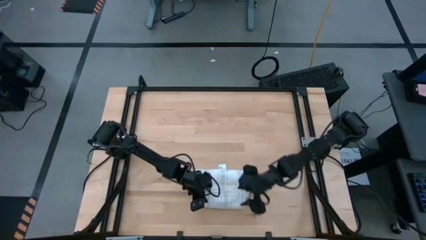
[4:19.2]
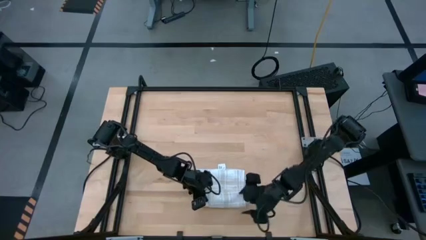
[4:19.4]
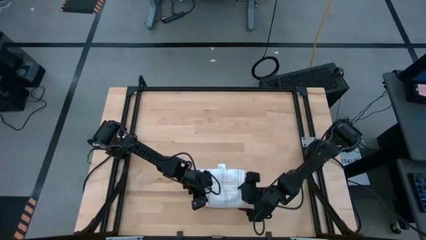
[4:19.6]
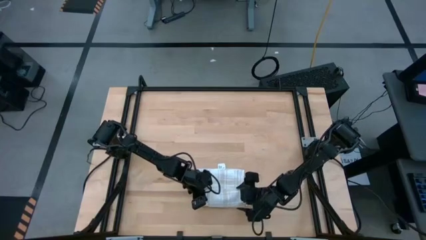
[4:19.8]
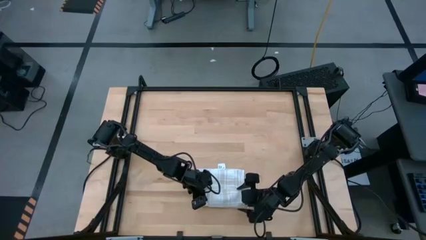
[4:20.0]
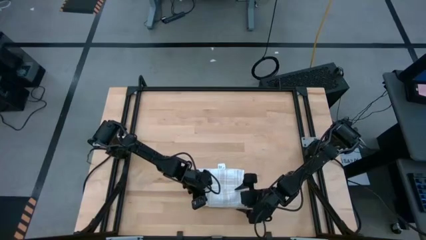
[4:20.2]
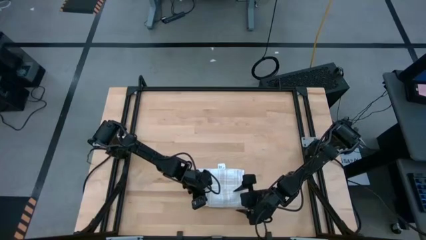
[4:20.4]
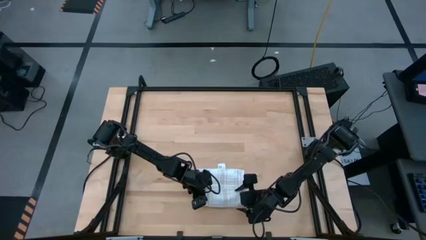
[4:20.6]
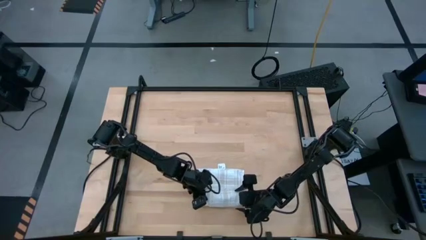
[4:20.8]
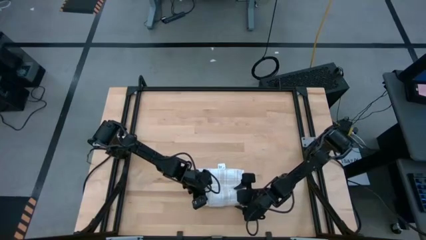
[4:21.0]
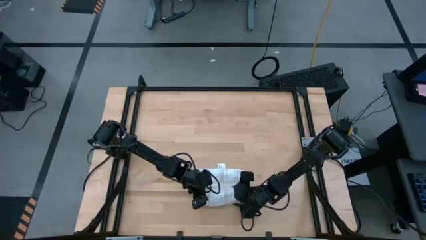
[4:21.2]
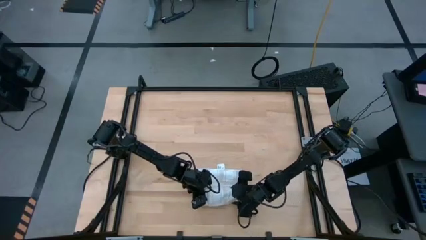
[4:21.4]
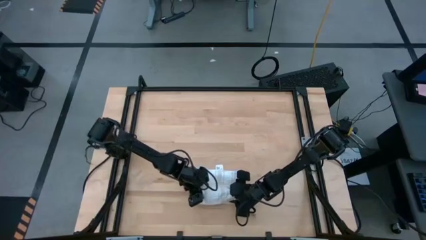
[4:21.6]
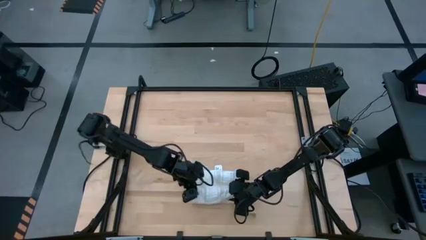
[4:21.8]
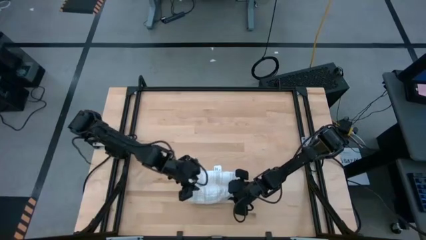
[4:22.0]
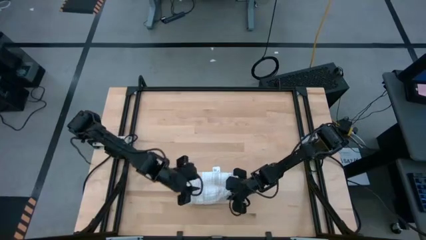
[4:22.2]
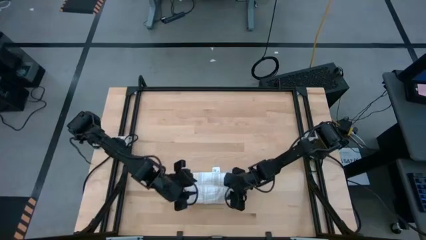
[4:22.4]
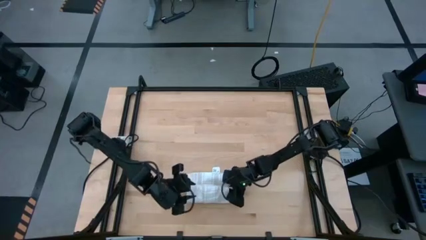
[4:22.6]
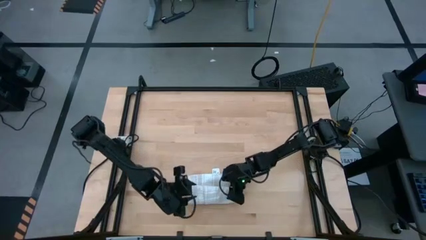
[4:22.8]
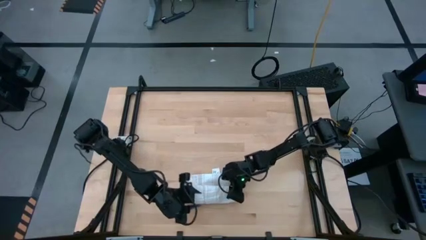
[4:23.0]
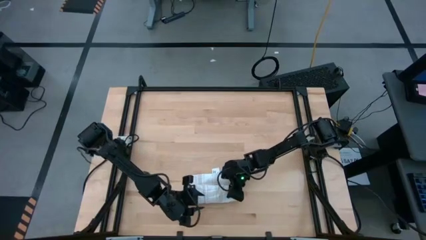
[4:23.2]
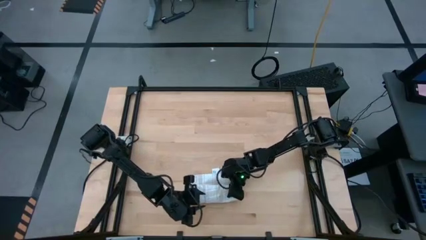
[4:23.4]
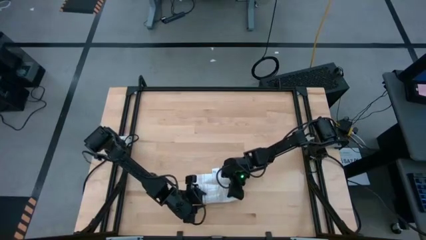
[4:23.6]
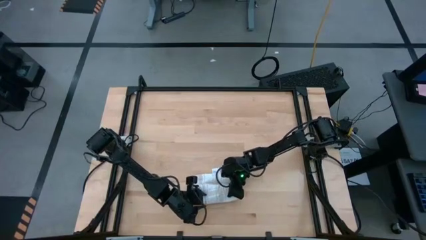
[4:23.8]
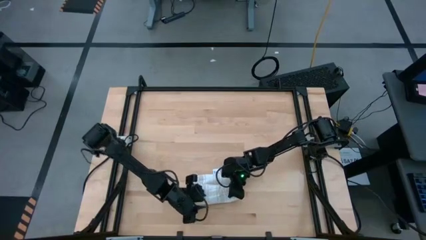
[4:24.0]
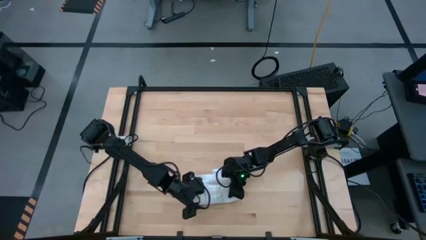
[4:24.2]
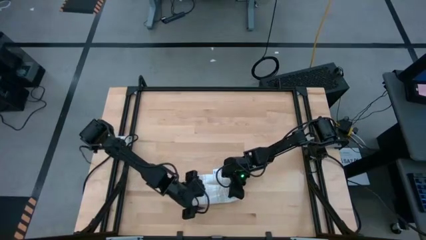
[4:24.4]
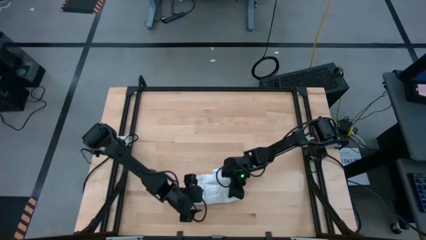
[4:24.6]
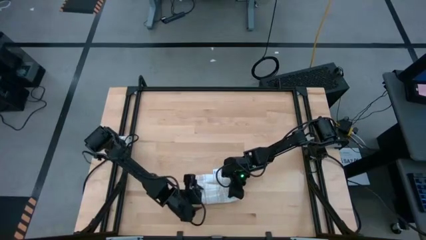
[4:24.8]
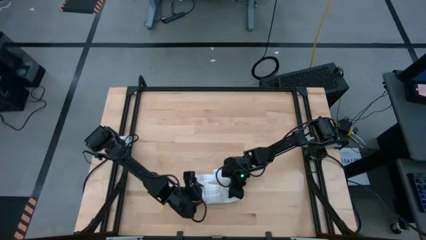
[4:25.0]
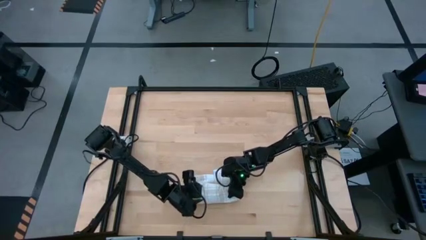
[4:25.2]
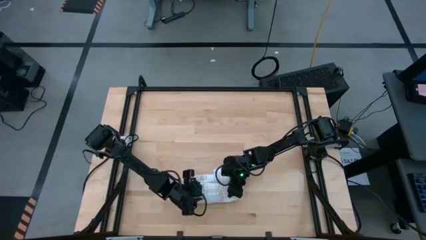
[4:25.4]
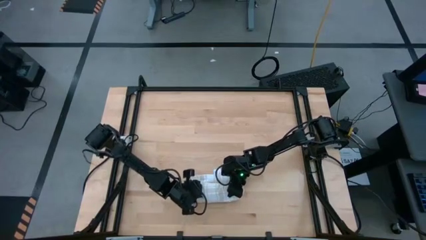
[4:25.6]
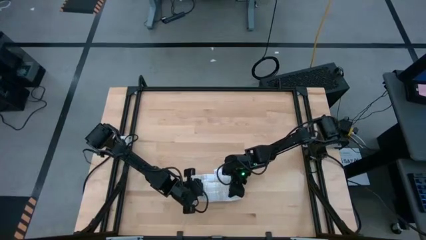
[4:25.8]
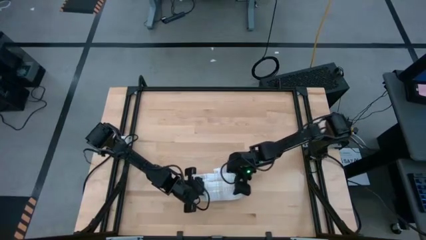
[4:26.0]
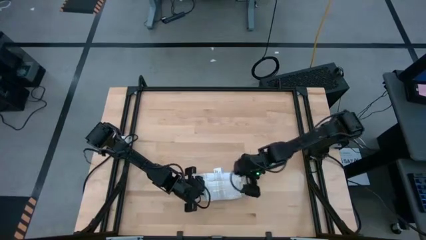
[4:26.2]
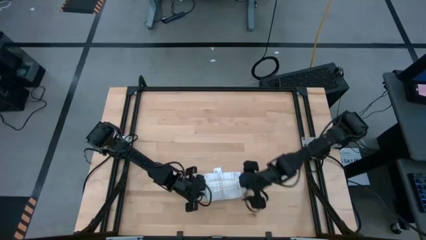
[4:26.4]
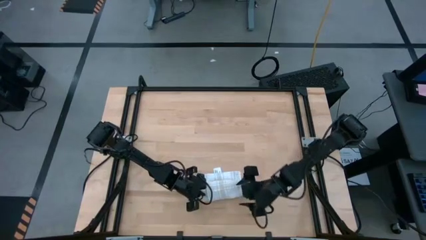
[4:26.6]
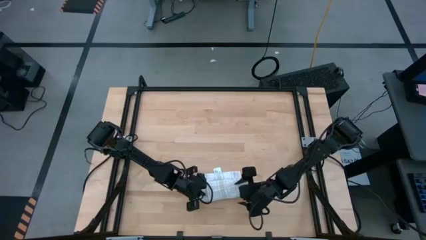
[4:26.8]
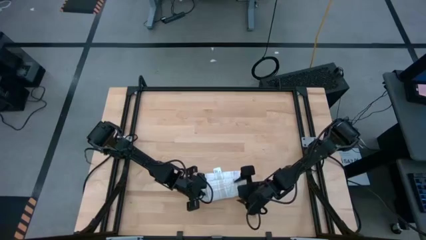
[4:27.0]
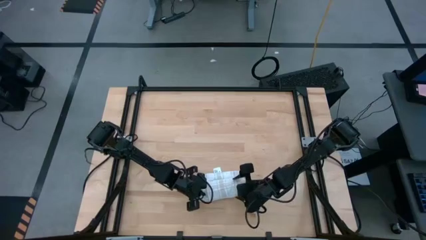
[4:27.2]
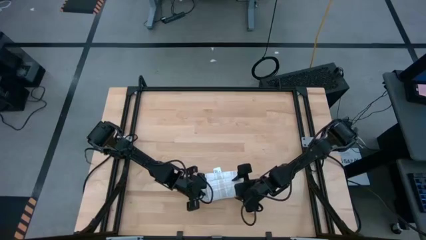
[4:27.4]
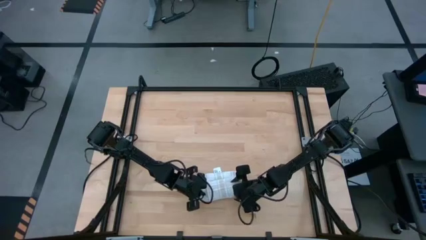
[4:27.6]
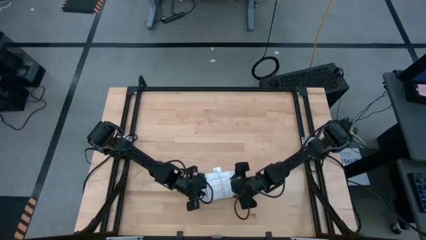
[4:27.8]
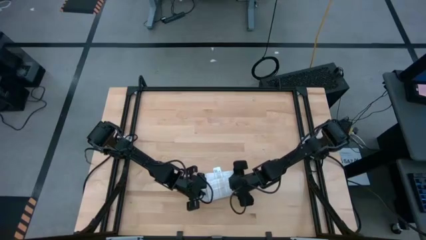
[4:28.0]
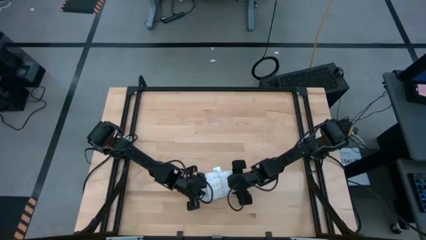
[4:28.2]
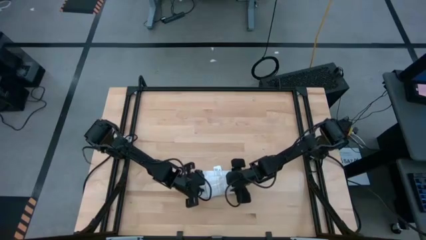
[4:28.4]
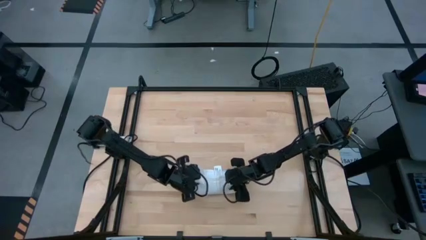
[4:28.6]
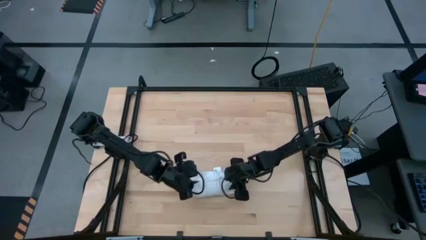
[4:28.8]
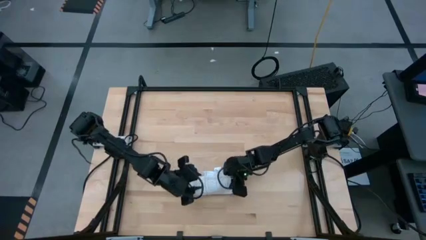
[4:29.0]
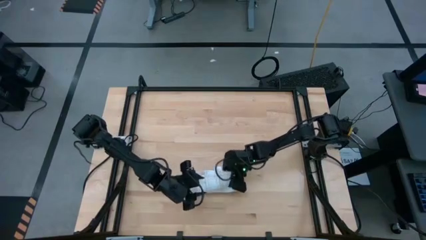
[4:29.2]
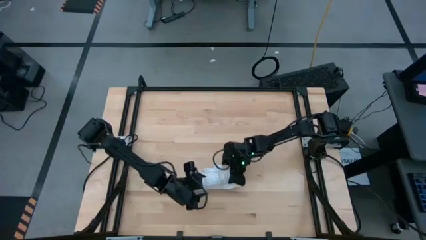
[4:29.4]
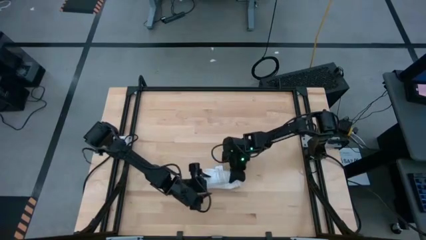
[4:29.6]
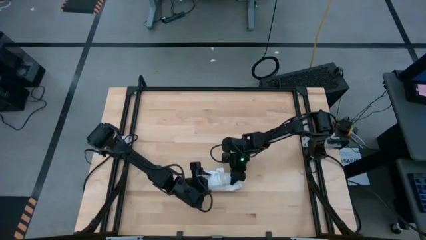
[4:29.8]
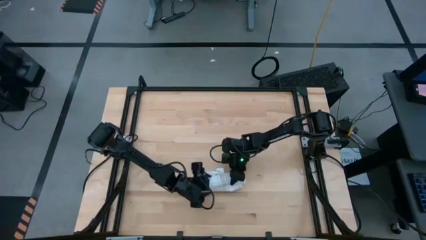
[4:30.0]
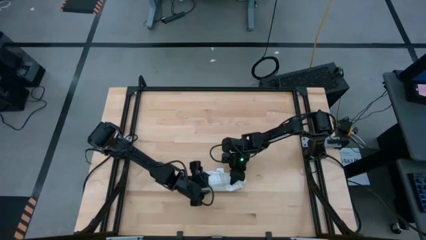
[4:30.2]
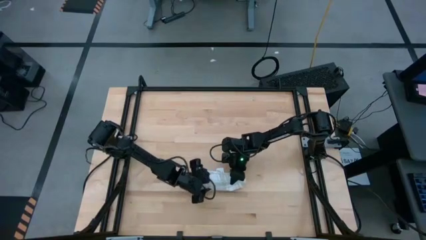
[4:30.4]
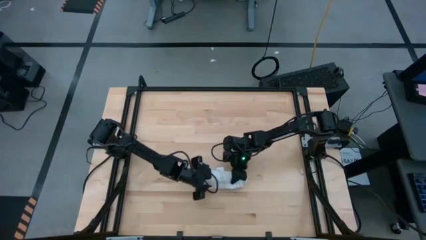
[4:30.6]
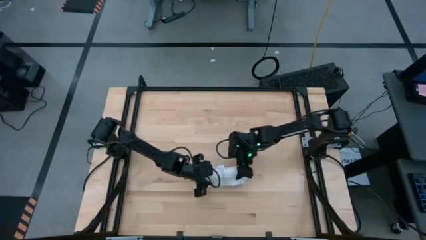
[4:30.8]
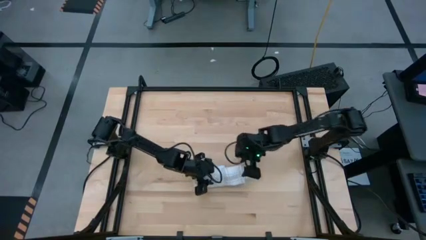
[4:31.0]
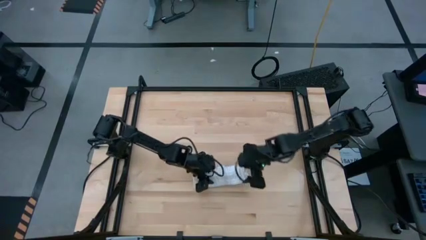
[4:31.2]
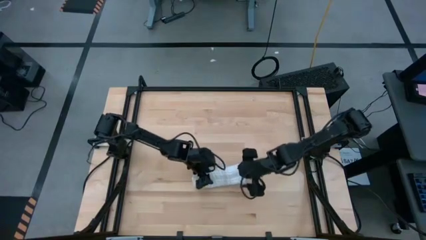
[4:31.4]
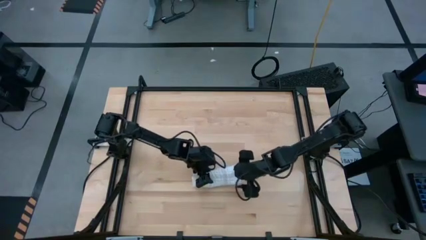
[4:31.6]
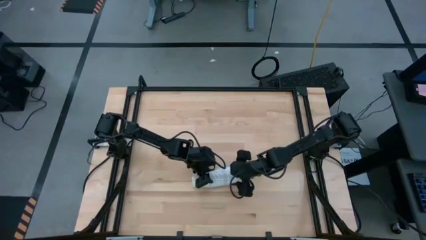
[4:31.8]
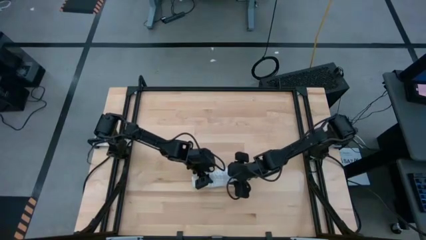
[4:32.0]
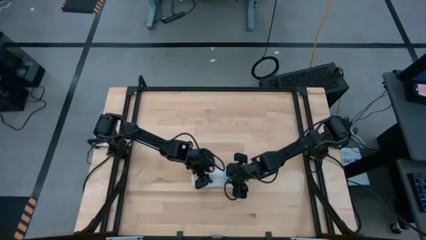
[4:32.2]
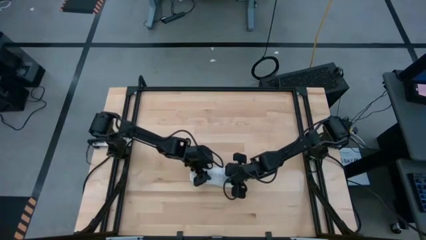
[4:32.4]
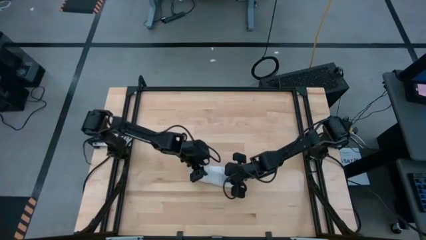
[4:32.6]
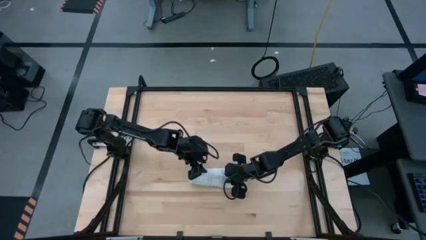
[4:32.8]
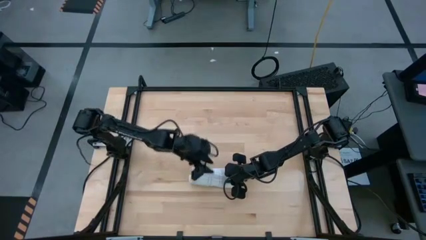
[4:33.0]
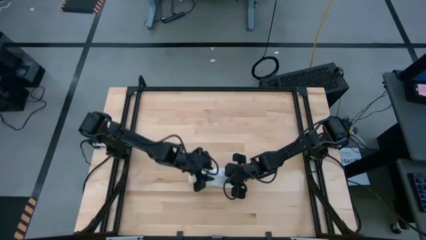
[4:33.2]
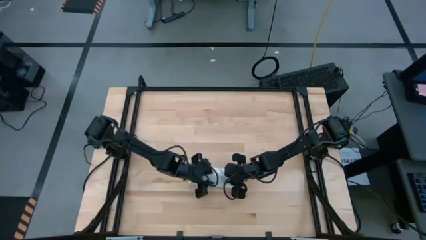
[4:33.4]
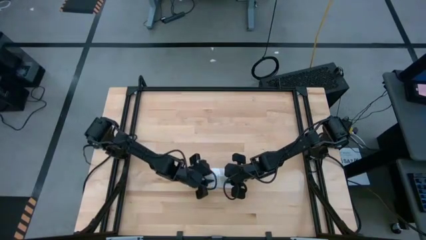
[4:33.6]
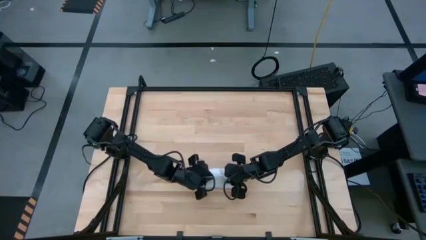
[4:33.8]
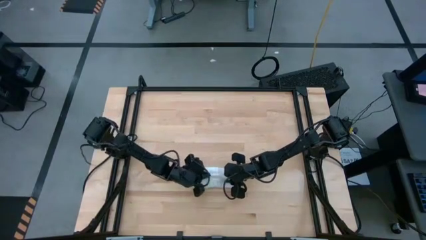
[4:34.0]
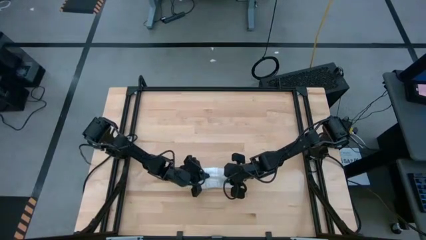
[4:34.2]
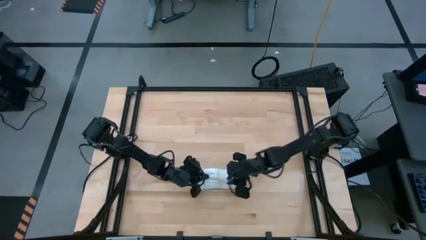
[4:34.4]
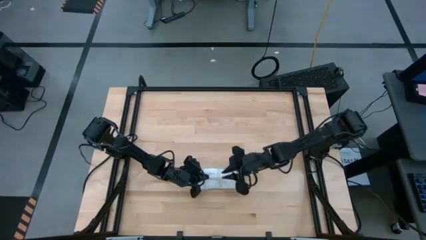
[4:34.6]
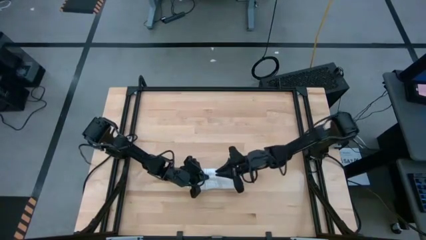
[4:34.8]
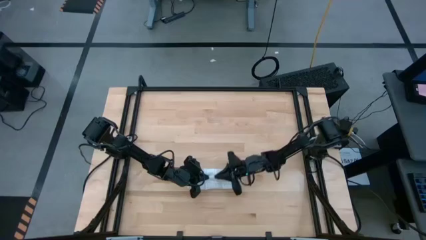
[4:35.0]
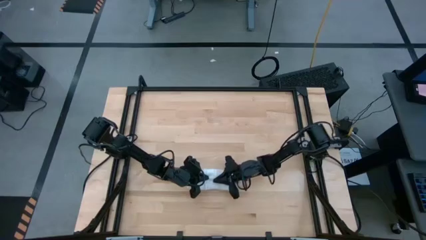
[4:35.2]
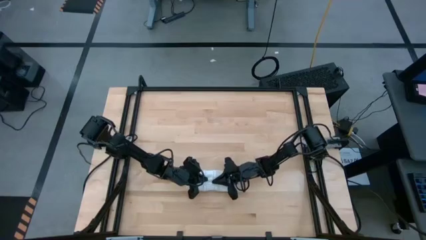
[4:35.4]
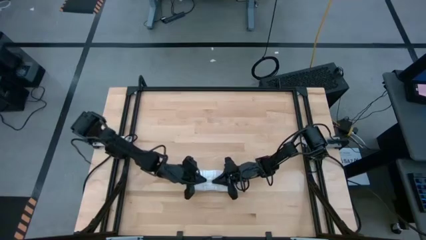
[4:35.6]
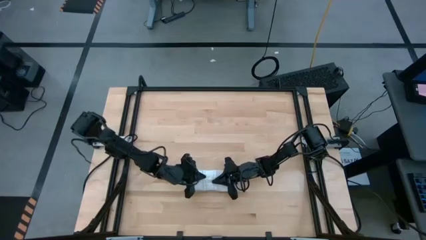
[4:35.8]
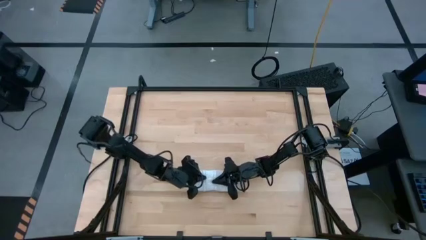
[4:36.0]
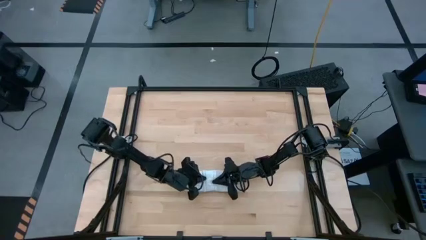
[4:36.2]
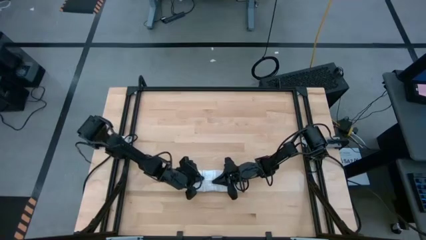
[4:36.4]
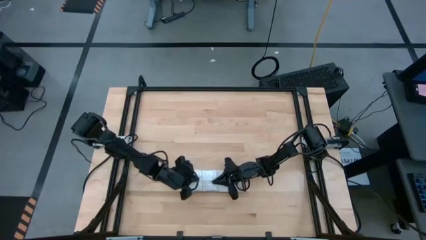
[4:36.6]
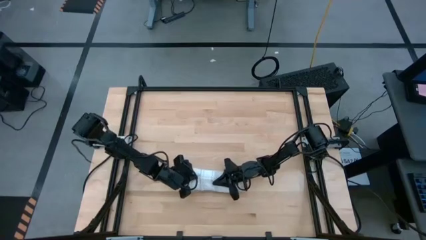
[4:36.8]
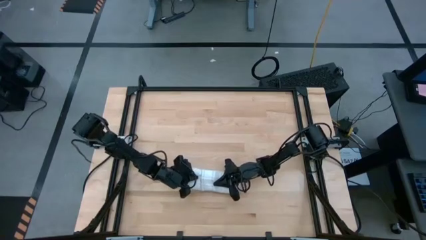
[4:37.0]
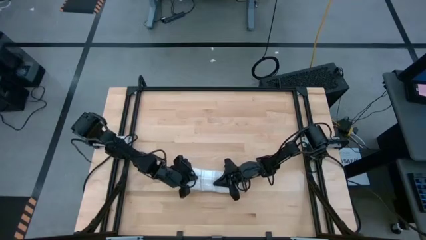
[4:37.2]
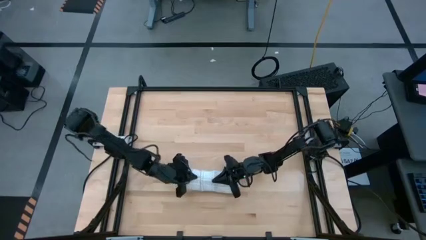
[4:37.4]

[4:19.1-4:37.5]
Task: Roll towel into tight, uniform cylinder
Roll the white towel
